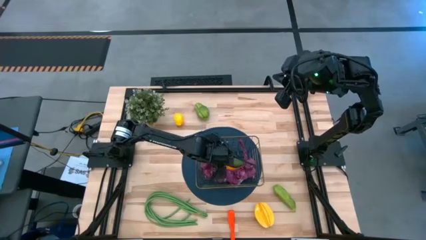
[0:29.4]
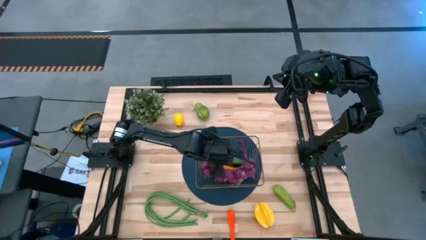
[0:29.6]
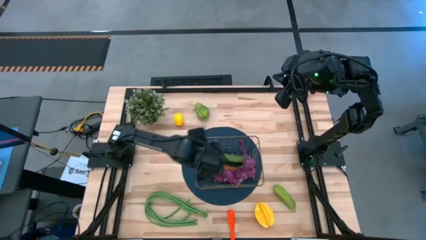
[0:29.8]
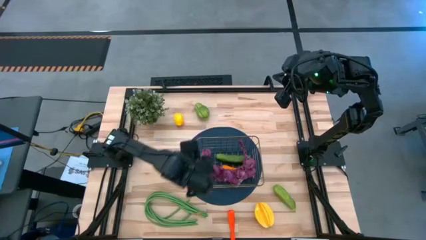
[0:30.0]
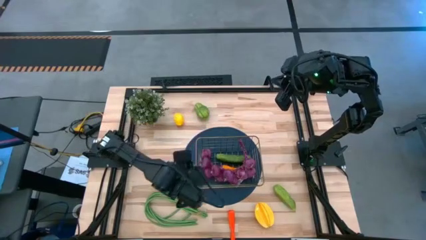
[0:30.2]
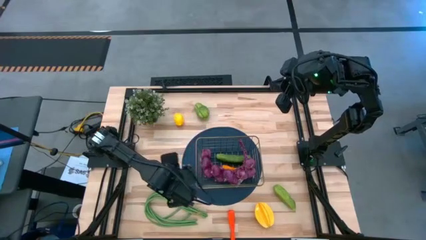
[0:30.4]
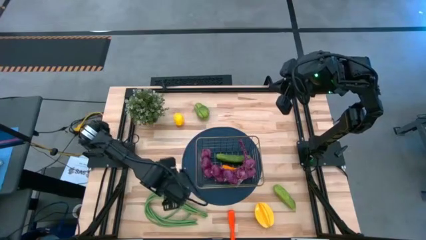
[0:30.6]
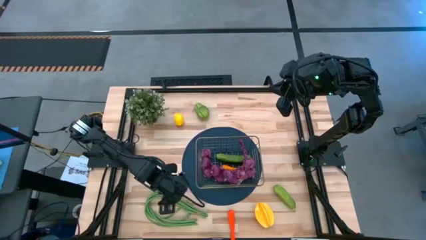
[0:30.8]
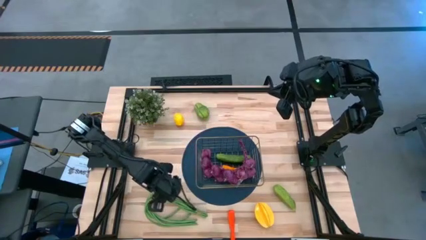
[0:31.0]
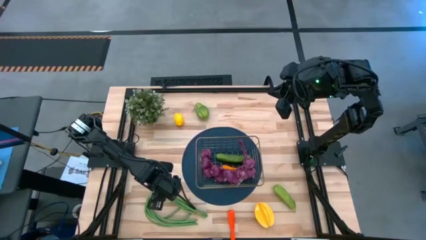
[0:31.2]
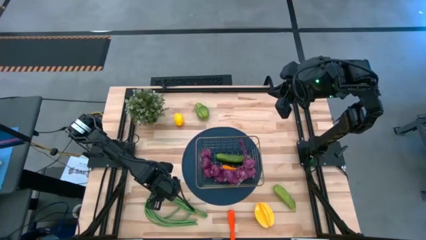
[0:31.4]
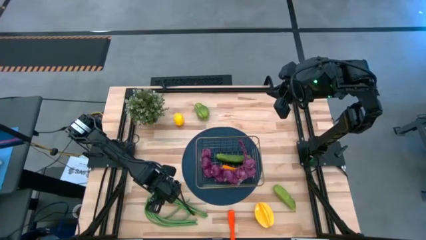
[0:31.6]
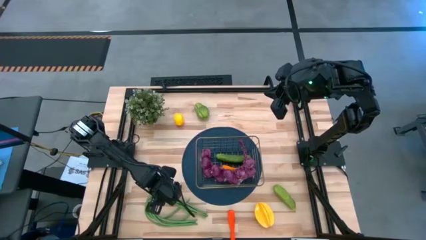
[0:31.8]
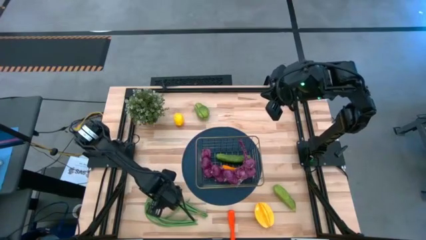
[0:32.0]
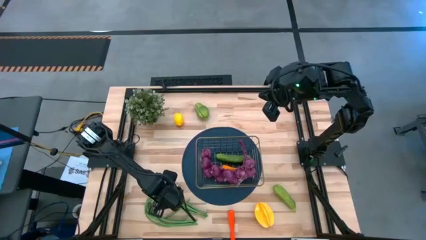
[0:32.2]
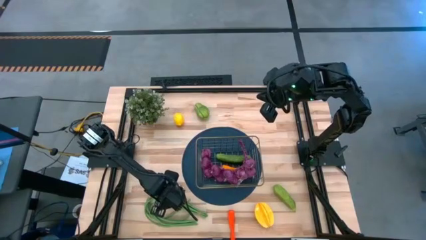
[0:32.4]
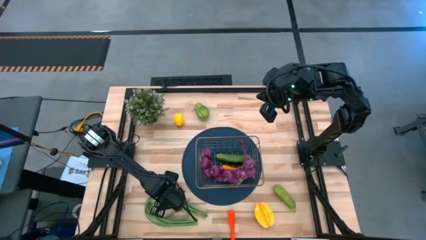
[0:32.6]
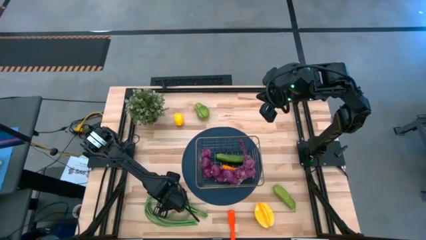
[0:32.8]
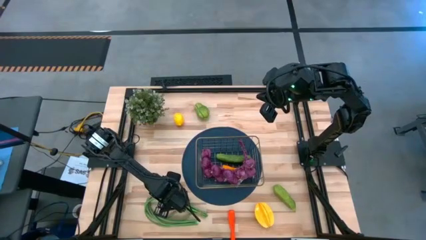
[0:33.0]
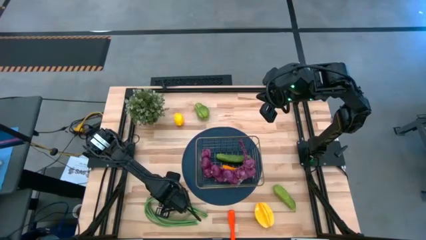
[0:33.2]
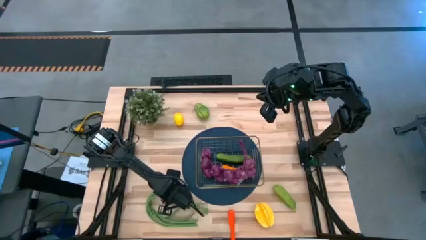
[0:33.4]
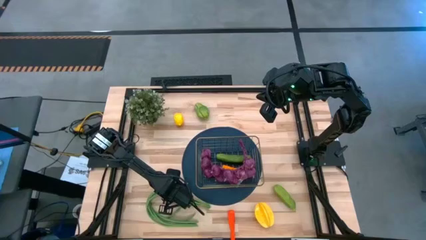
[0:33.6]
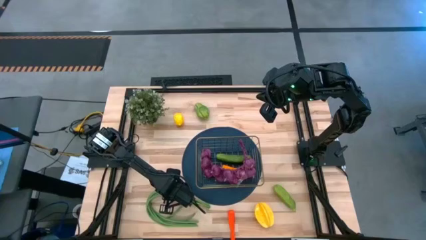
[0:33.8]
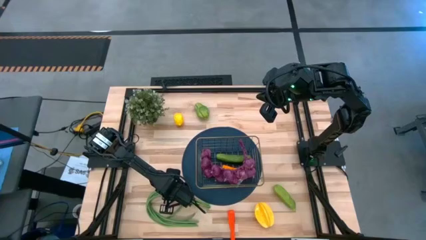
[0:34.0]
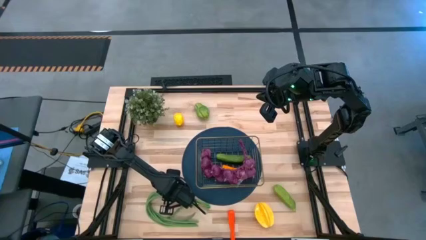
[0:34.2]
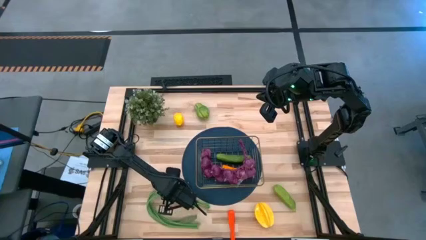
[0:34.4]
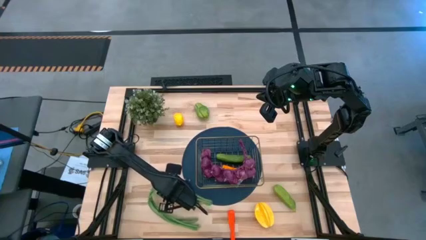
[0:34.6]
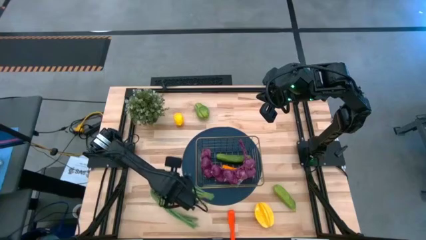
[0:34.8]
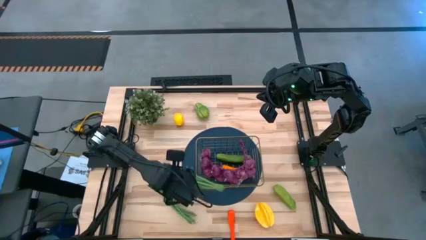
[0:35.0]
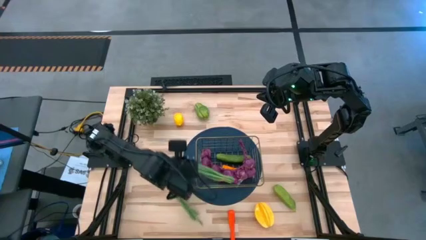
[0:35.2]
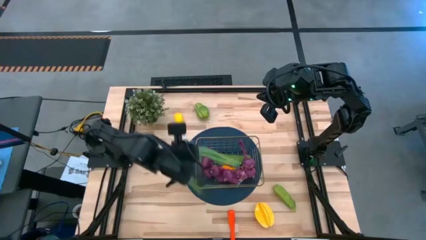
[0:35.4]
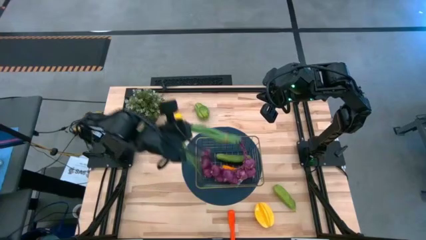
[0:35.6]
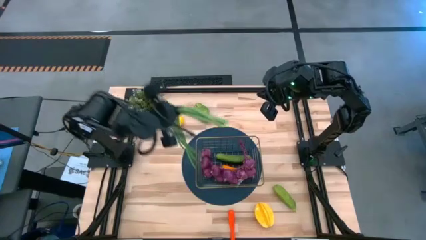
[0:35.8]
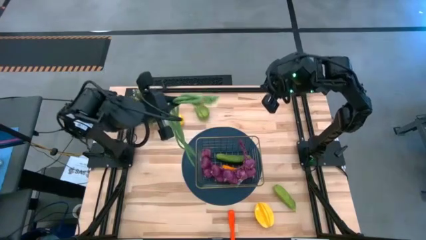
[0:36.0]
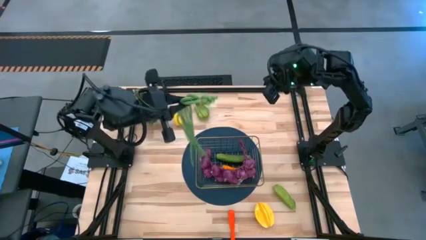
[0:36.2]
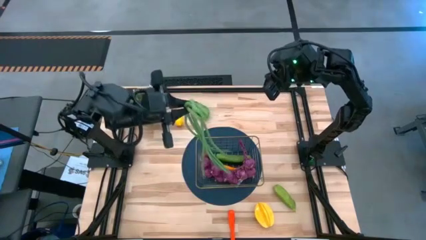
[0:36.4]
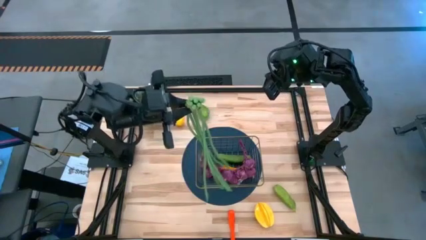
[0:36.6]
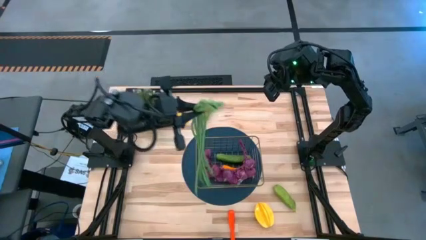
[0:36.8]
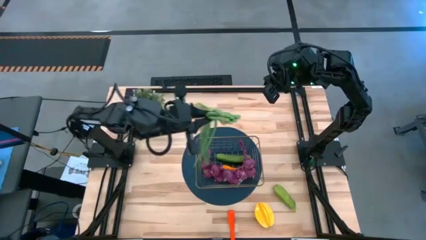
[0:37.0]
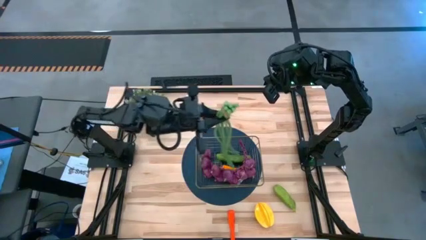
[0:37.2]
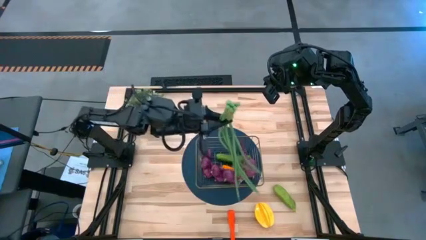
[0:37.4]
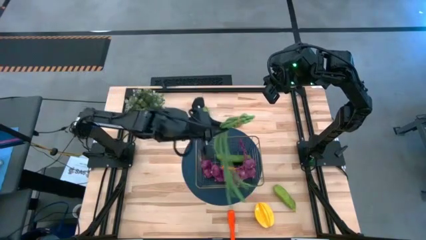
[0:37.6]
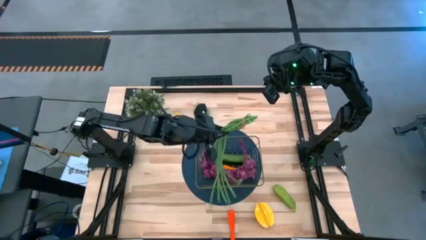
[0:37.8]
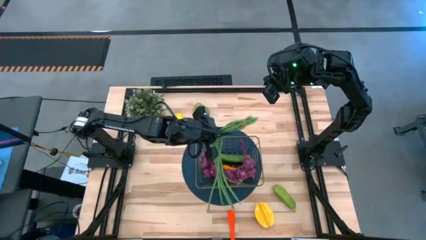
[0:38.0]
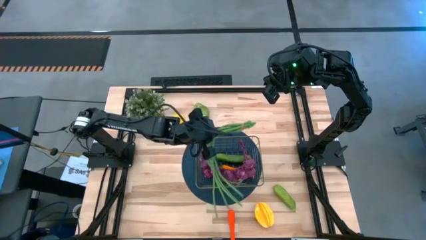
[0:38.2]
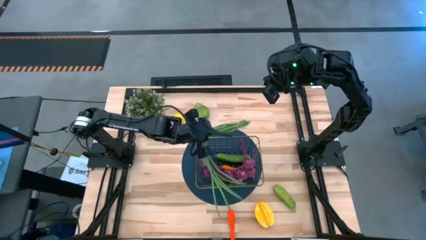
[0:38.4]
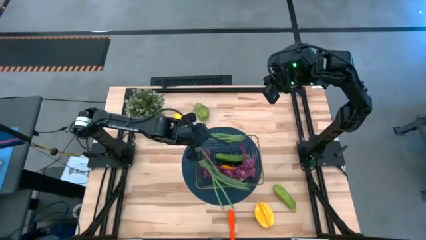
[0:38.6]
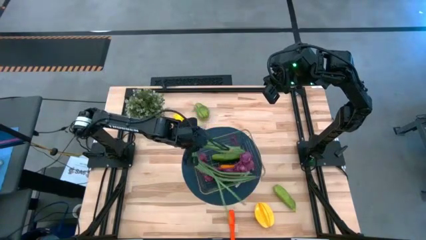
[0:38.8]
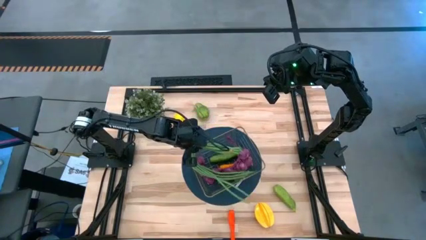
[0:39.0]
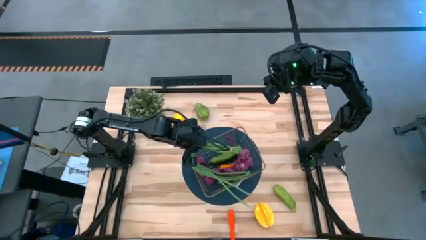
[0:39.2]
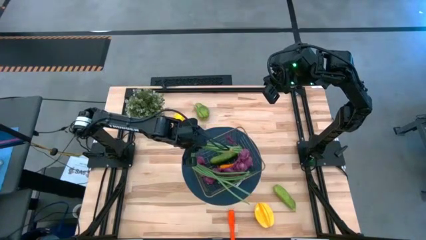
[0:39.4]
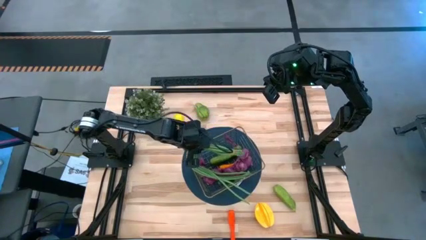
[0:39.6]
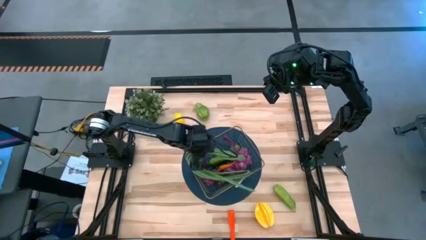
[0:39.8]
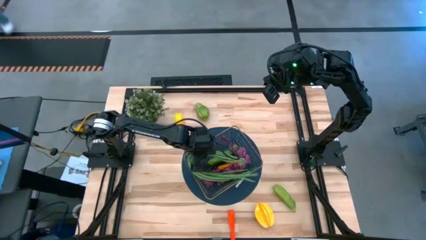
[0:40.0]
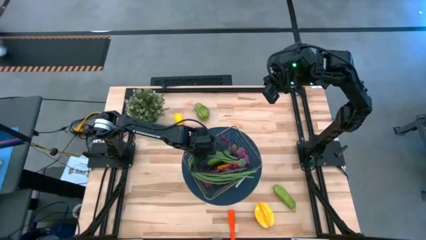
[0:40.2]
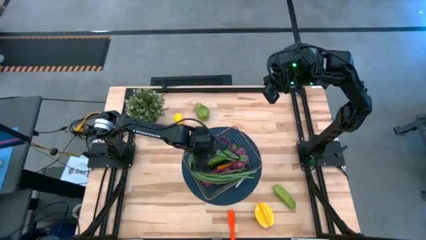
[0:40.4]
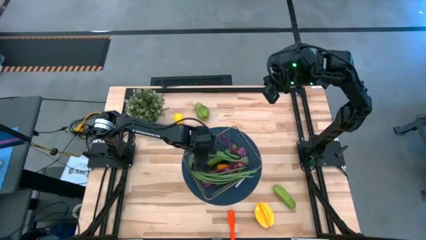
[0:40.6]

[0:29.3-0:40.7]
Task: Build produce basket
Put the green beans into the gold wire basket

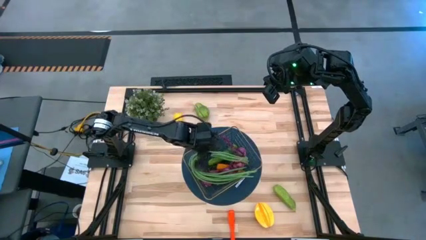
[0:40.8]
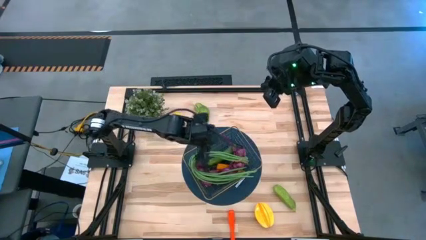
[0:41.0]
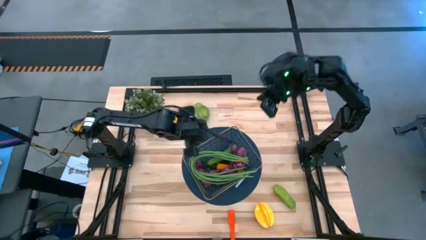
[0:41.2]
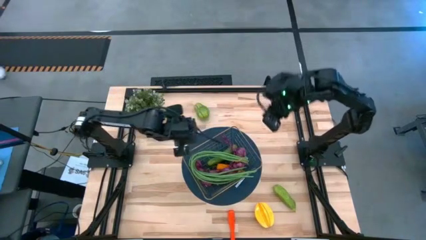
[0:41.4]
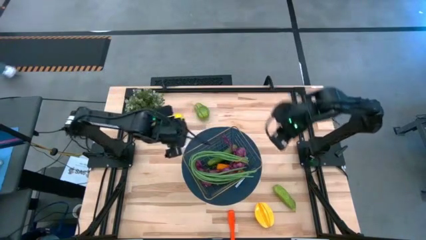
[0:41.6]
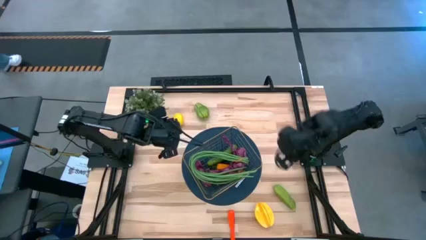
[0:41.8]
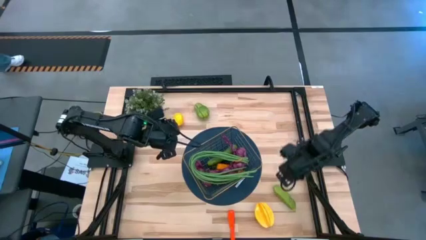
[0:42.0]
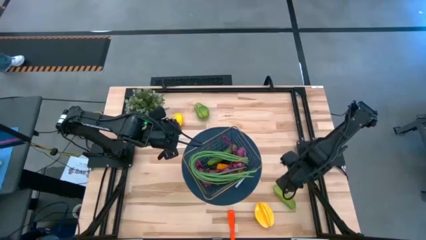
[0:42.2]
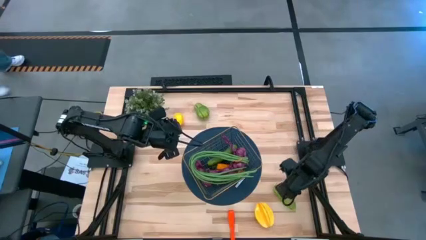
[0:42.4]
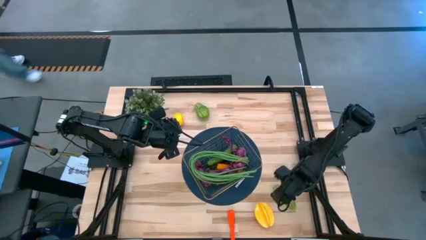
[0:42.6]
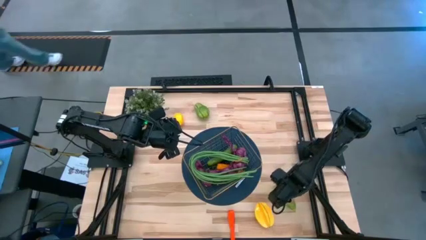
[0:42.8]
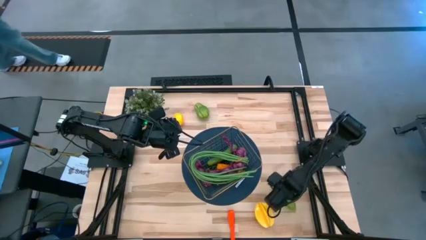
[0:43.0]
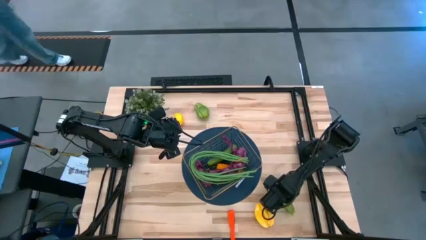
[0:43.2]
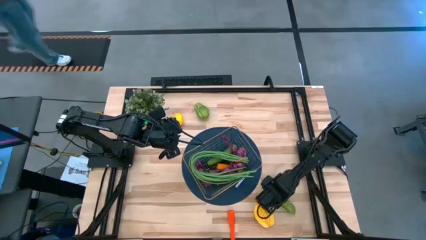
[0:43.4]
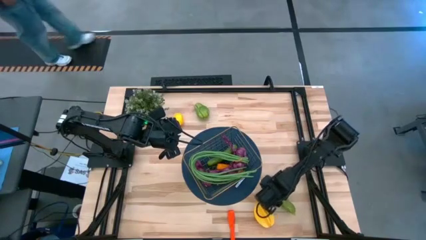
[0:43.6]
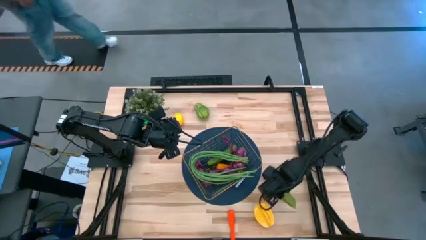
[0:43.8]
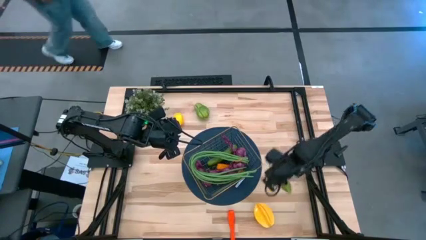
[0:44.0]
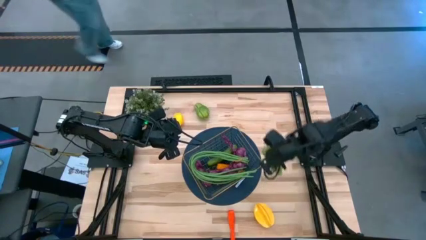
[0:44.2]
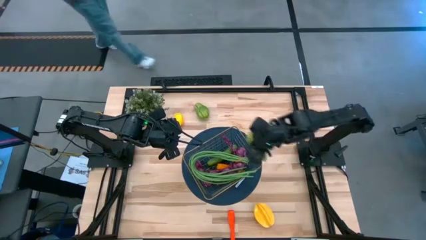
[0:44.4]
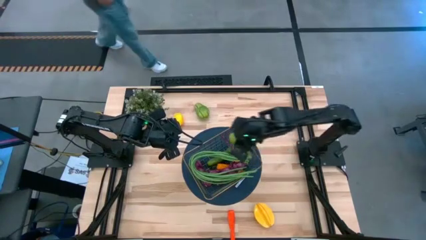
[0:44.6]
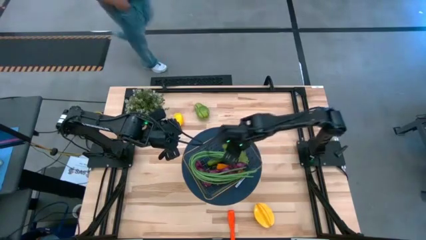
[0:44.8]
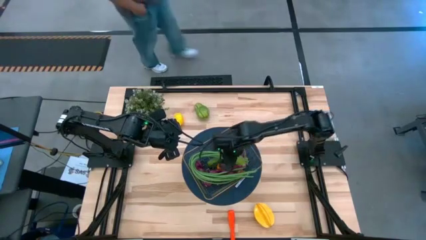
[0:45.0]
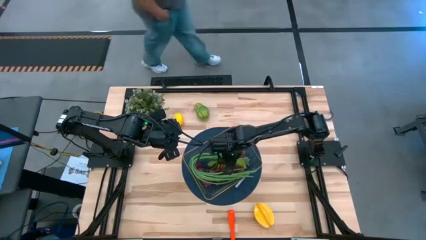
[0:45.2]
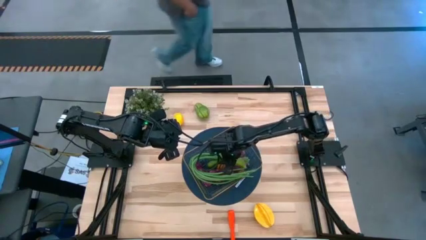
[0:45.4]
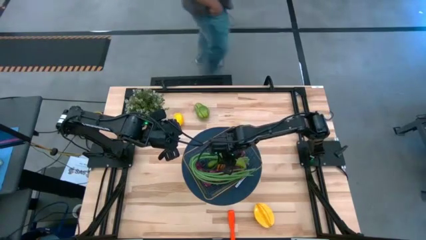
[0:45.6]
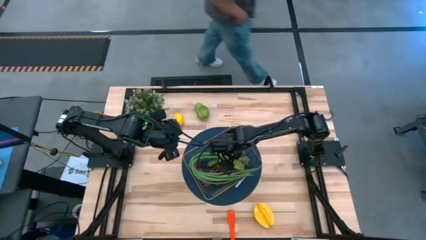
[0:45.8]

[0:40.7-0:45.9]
Put the green cucumber into the gold wire basket
